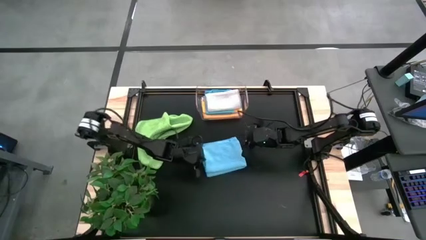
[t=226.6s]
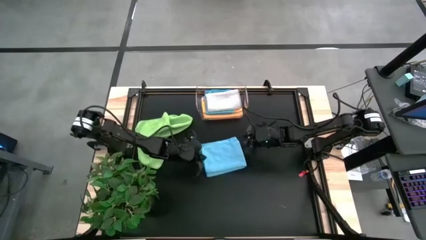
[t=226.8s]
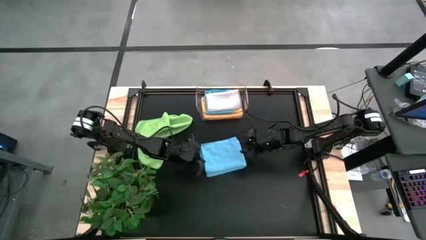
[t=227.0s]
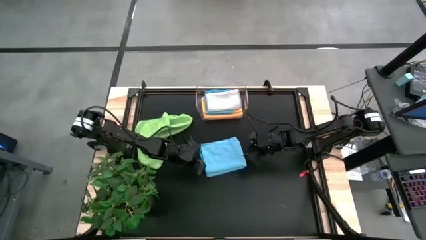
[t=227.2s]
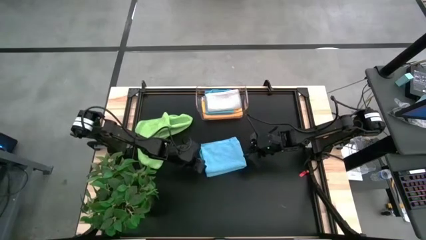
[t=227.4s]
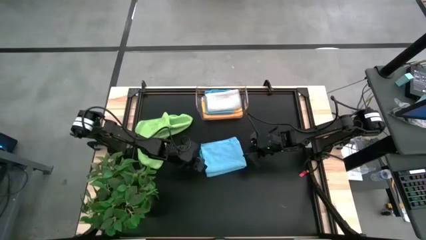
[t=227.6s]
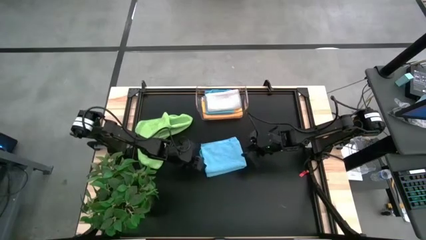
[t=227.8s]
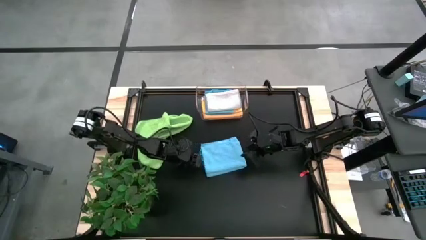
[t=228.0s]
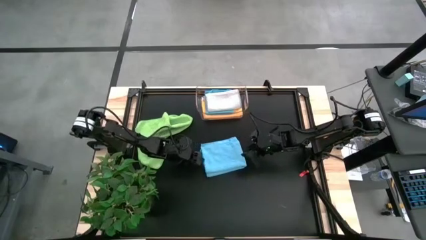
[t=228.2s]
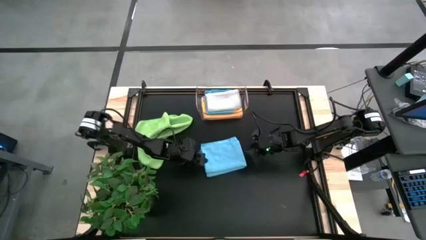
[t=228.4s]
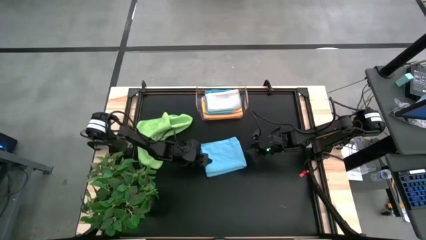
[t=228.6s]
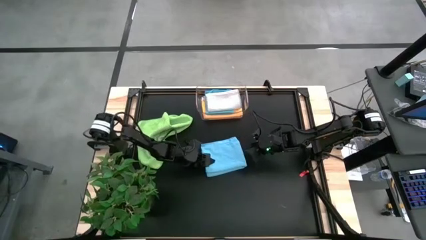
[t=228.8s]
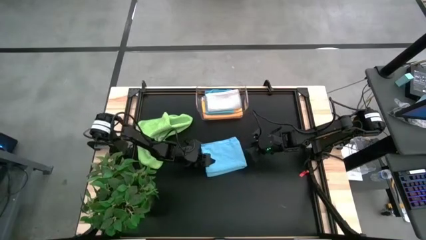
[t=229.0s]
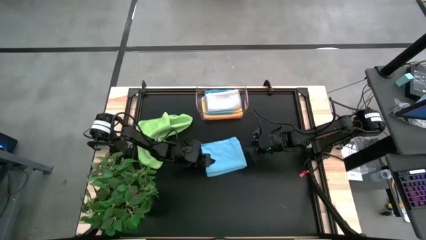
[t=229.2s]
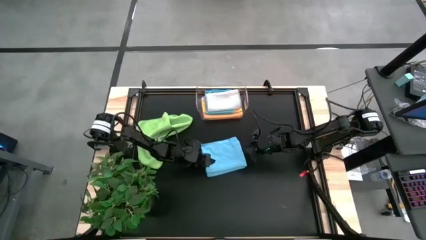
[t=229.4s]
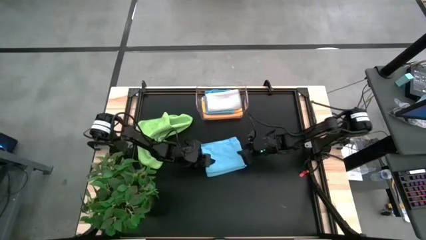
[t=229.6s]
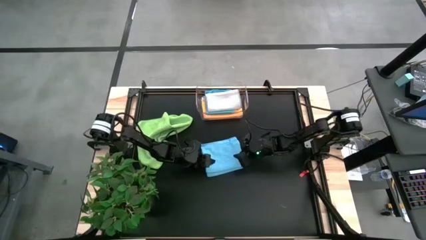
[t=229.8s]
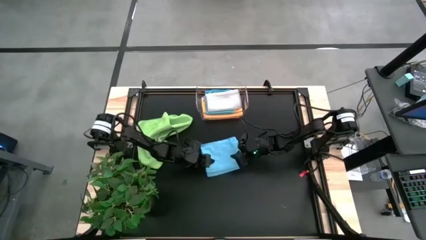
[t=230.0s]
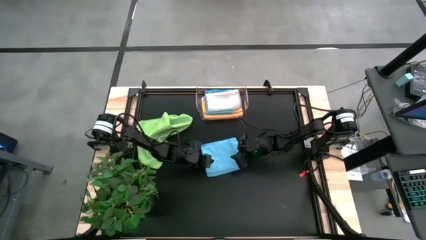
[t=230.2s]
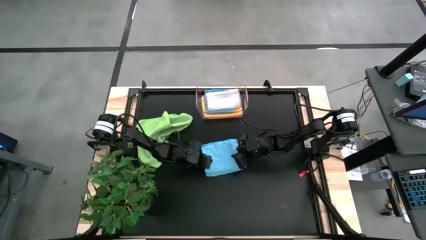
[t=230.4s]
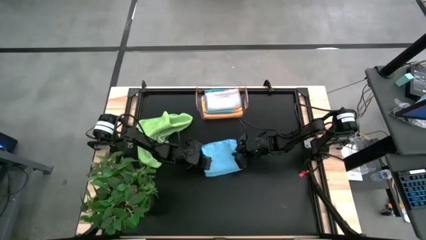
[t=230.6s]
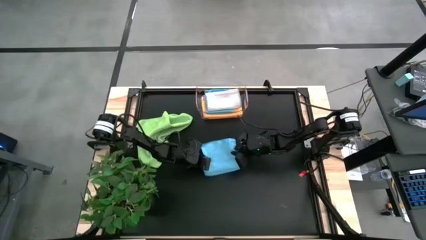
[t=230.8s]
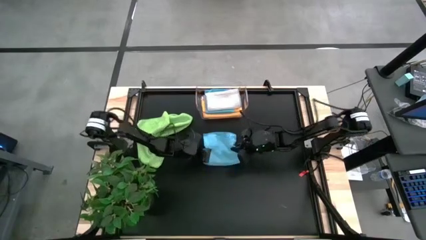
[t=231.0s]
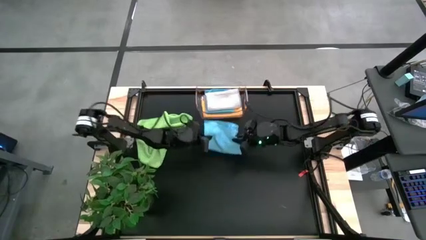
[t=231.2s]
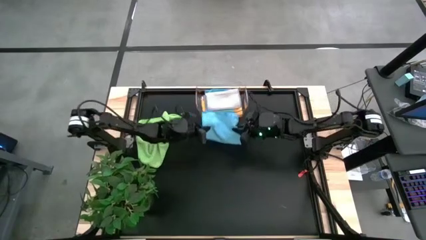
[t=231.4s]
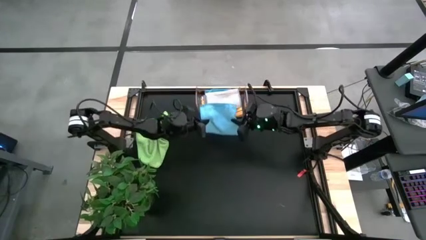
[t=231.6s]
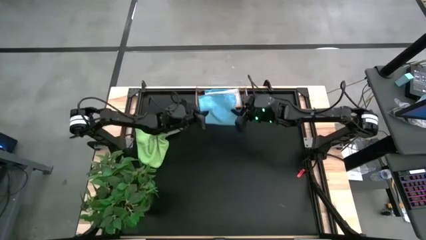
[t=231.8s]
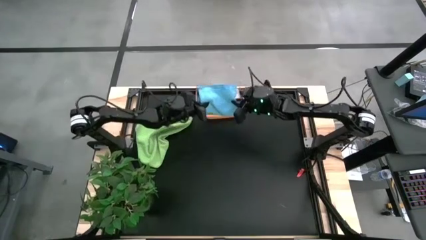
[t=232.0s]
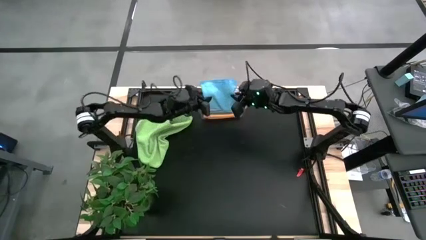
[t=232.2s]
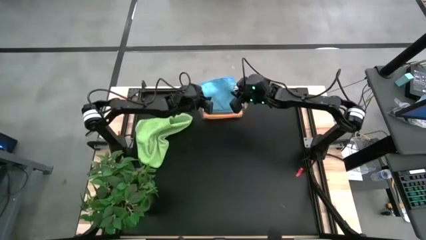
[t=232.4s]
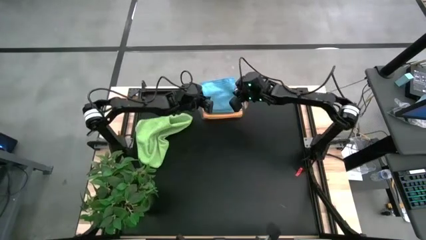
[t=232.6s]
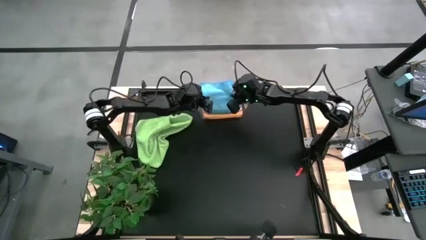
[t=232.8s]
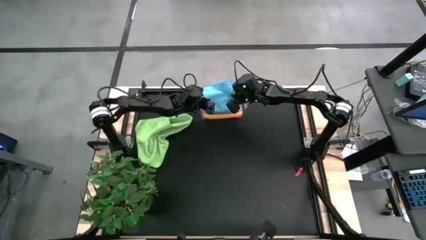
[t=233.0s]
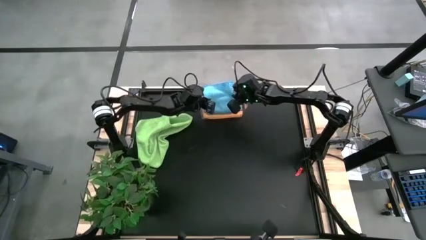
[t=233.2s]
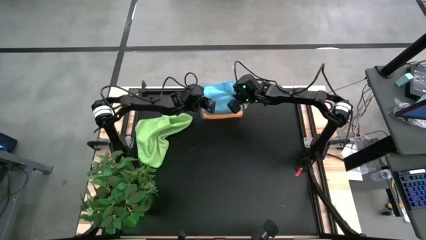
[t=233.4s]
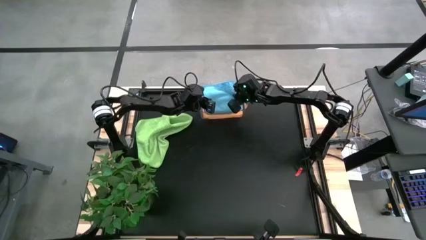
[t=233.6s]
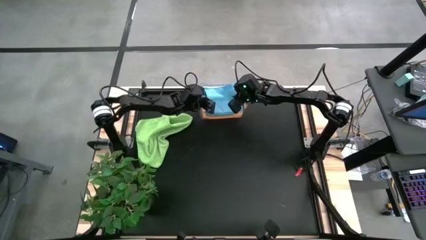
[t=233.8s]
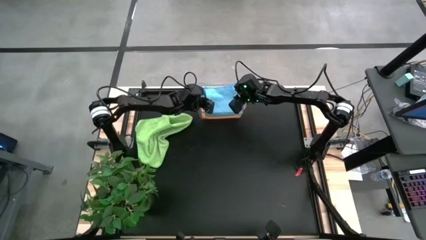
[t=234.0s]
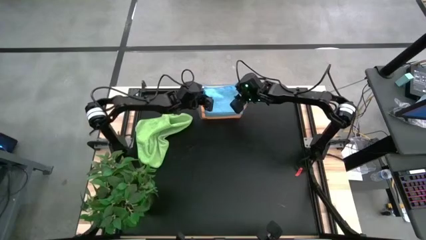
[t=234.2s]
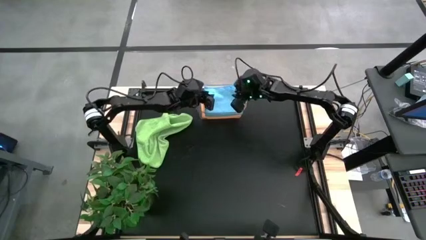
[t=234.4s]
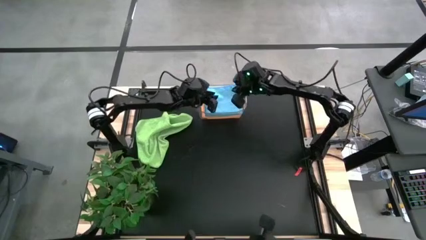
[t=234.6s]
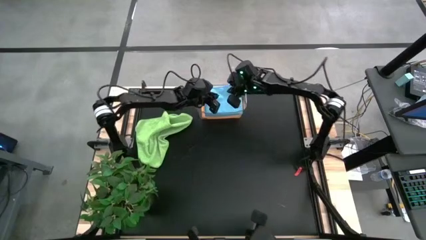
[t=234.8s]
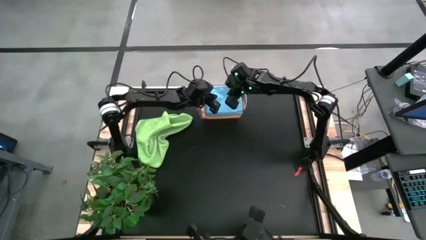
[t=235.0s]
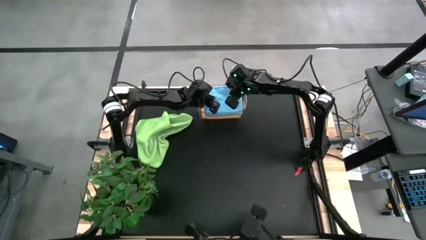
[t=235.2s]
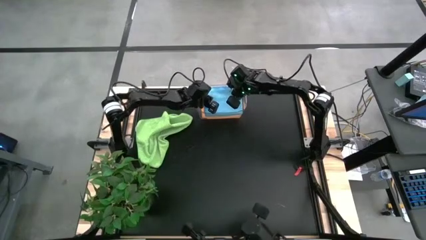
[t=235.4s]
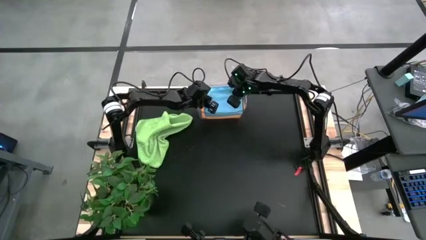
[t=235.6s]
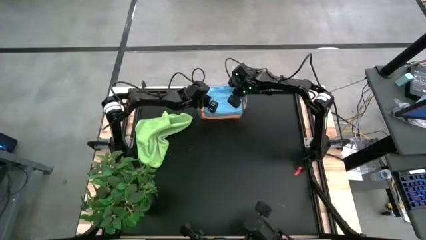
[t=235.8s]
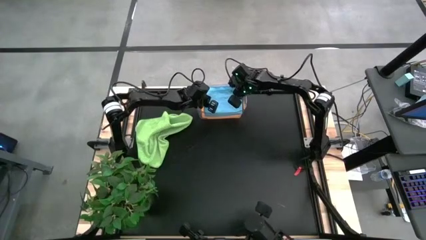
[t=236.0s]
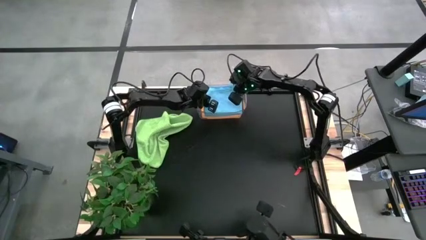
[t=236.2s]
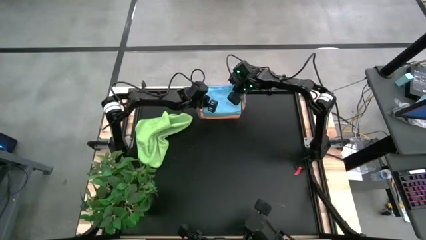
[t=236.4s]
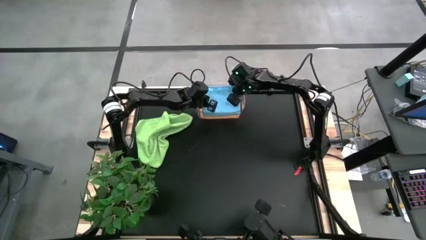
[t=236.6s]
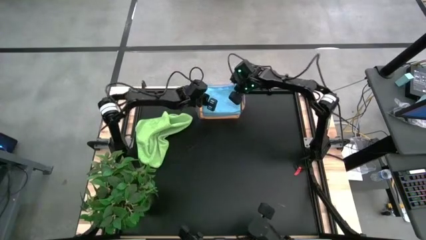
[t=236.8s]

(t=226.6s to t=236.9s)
Task: Fold microfiber towels
Put the blue microfiber cloth into the transparent bin

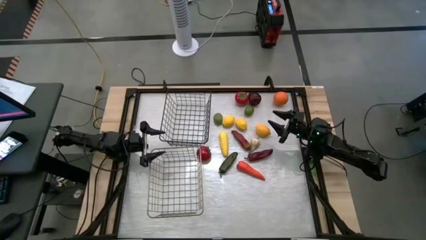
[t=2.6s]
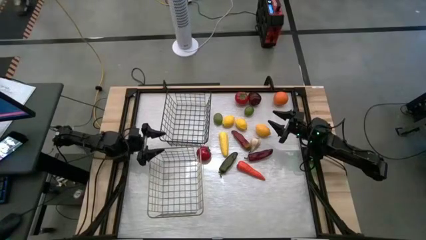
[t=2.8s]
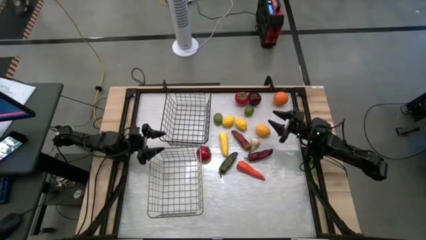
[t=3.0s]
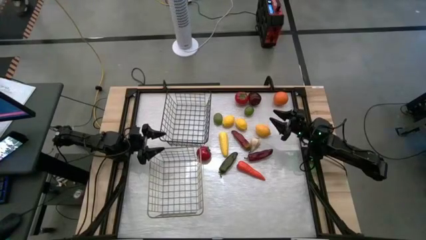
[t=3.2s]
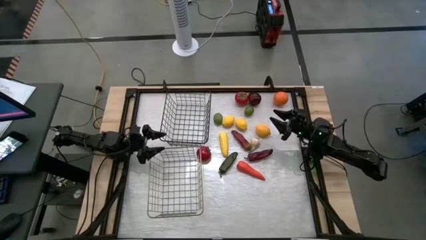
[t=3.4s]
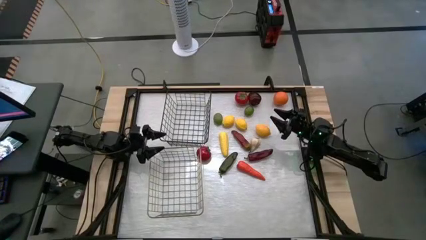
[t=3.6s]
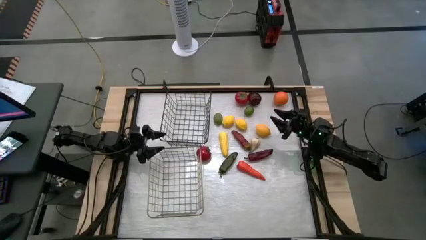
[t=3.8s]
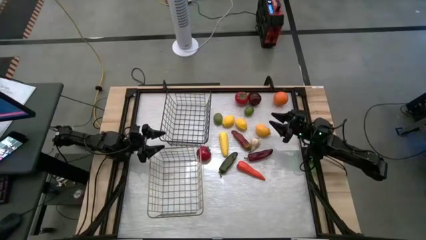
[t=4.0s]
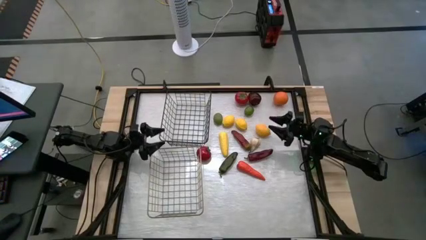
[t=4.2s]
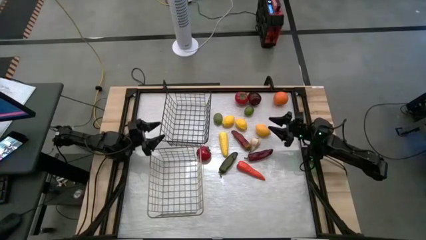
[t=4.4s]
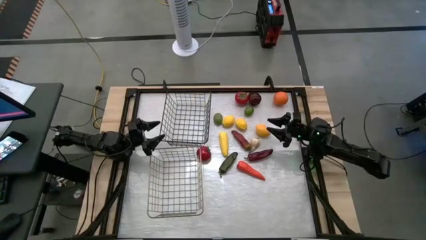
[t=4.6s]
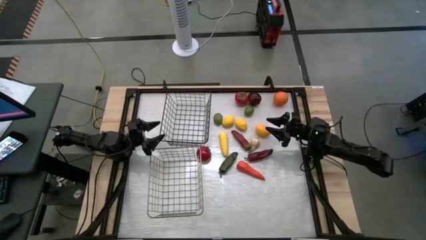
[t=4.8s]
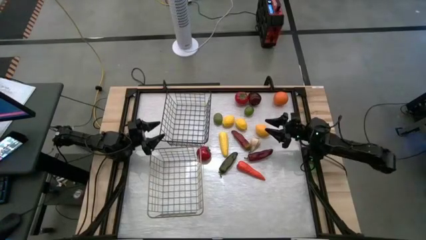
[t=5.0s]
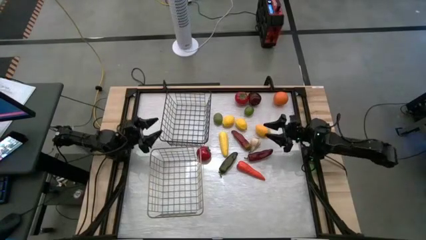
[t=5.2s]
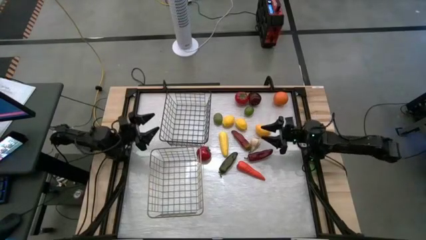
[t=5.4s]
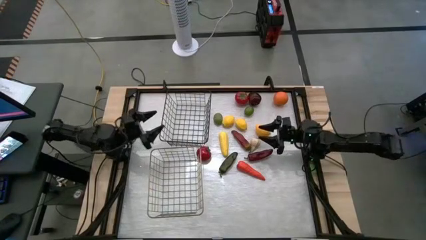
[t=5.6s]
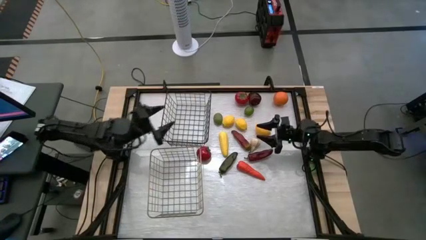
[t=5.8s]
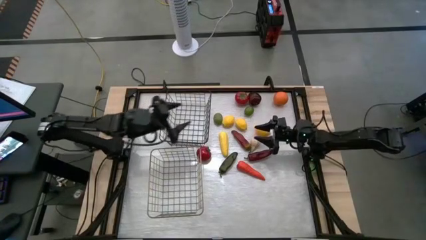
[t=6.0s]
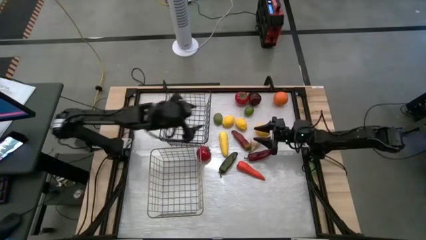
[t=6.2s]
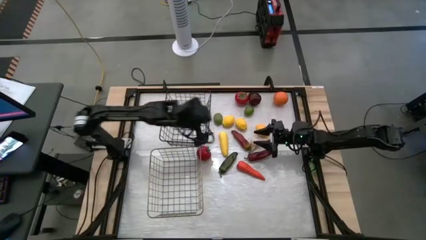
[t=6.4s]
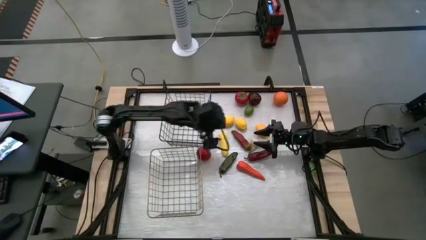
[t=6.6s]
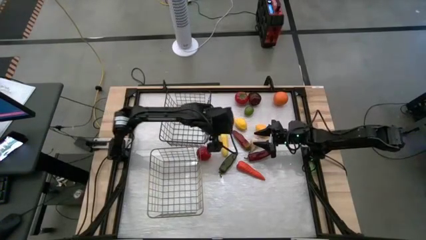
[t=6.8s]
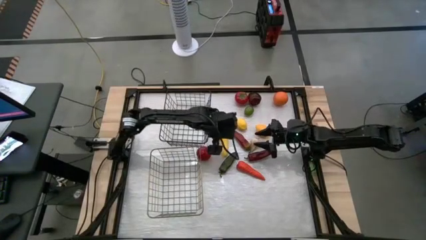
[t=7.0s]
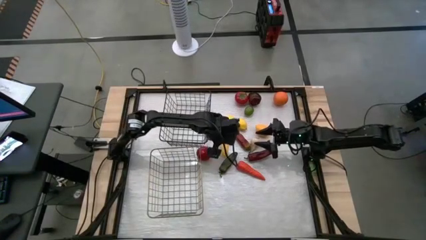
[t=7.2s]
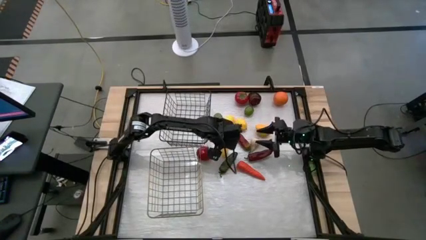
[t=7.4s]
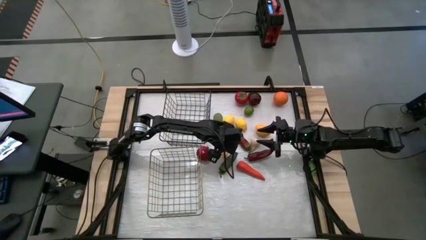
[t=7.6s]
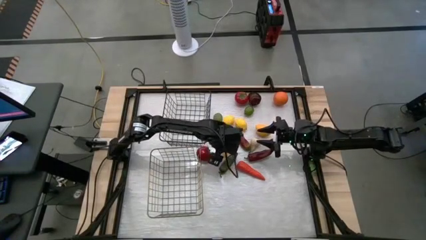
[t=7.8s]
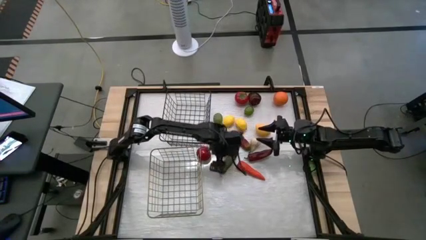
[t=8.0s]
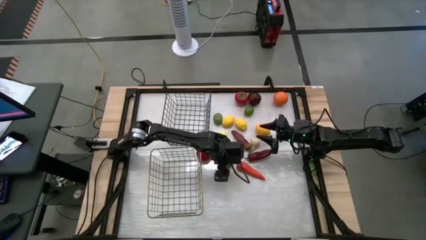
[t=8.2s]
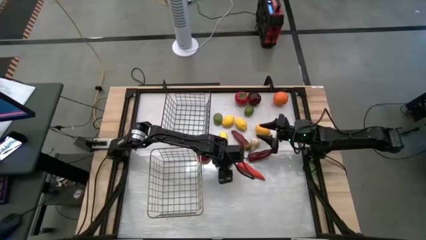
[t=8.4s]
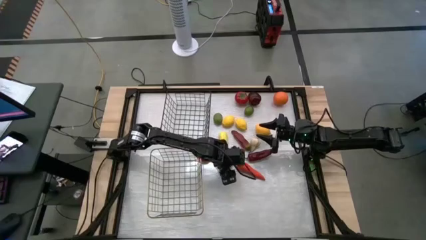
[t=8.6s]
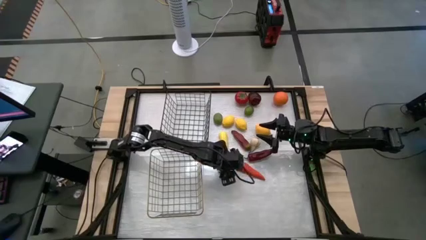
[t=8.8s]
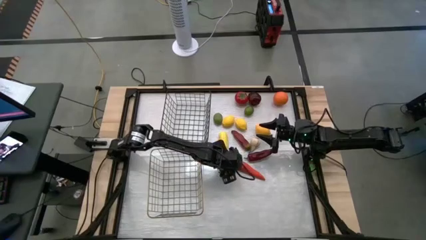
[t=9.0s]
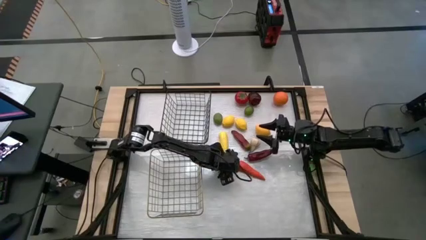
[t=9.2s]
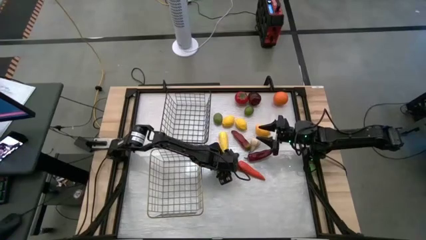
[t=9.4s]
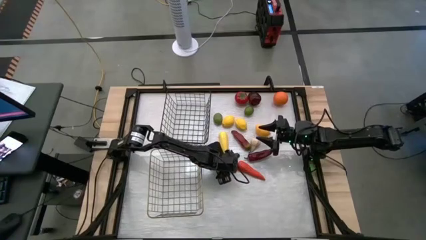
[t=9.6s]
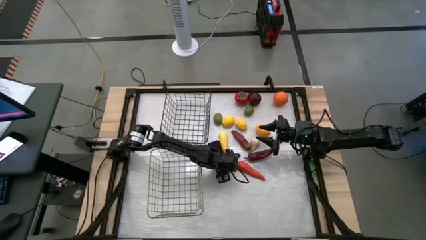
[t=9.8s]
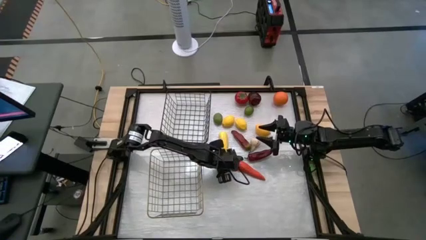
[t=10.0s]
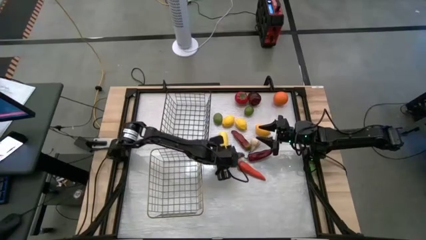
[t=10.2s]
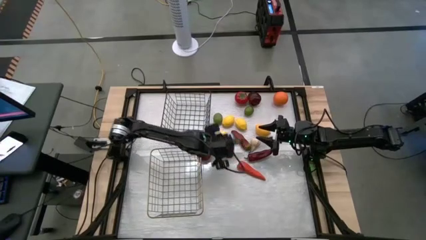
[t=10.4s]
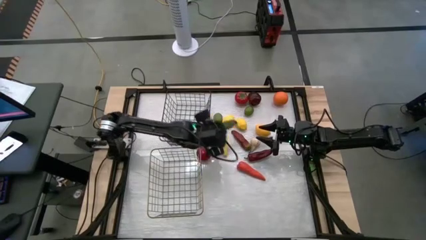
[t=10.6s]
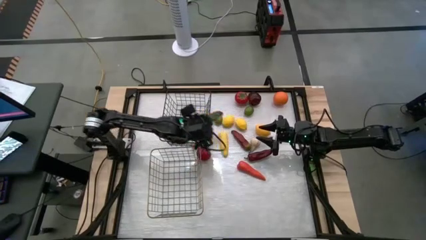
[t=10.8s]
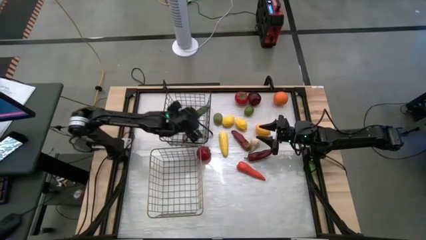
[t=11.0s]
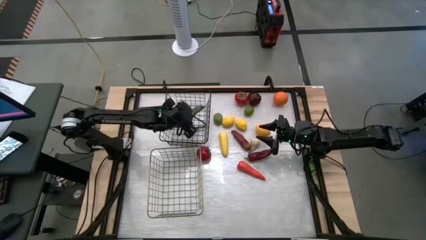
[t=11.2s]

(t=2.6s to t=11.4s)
Task: Sort produce into baskets
Put the green chili pepper into the black wire basket
